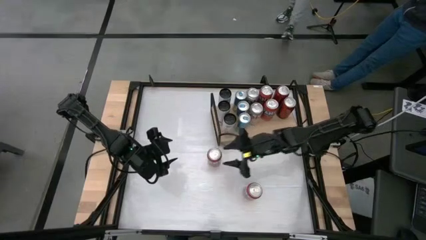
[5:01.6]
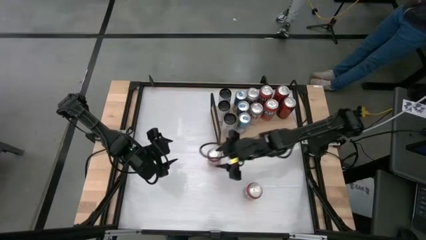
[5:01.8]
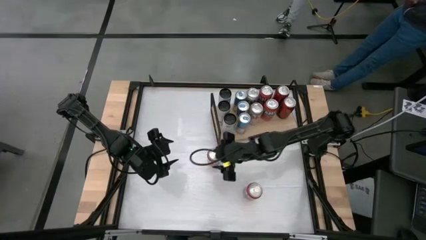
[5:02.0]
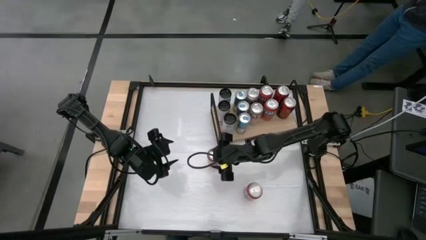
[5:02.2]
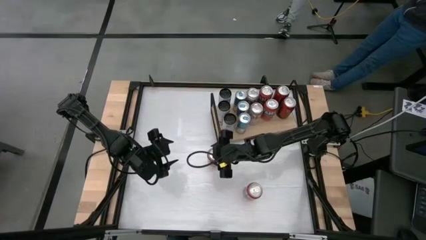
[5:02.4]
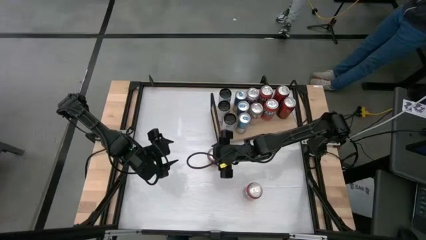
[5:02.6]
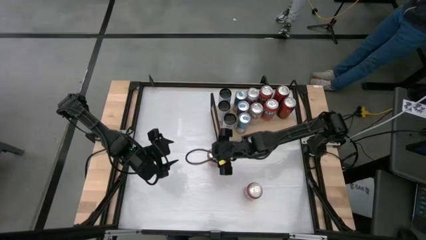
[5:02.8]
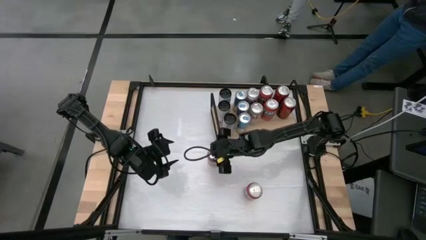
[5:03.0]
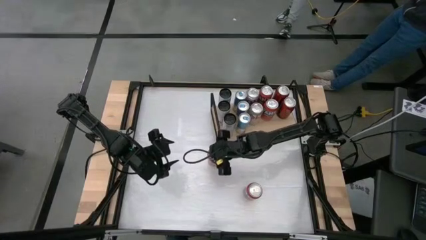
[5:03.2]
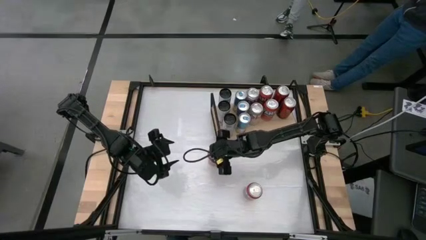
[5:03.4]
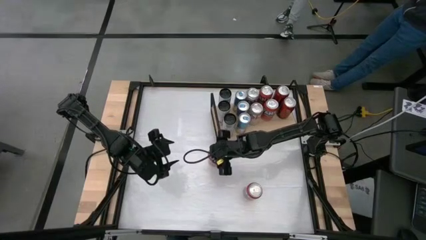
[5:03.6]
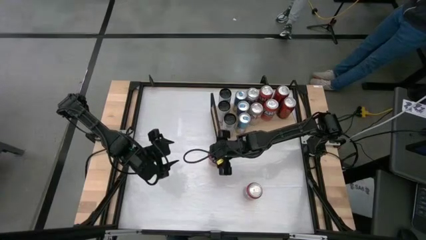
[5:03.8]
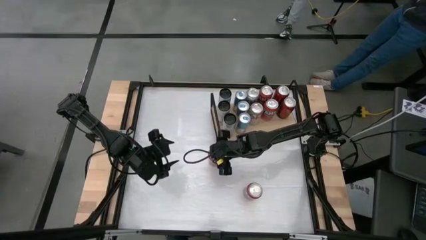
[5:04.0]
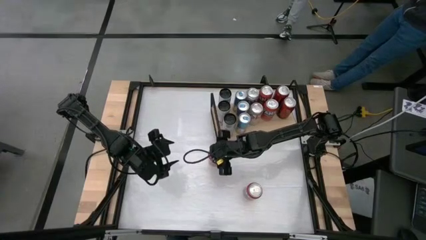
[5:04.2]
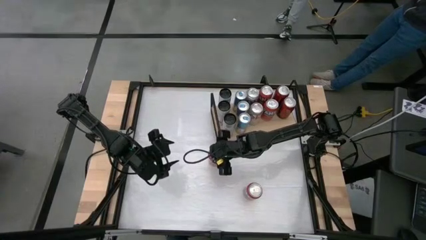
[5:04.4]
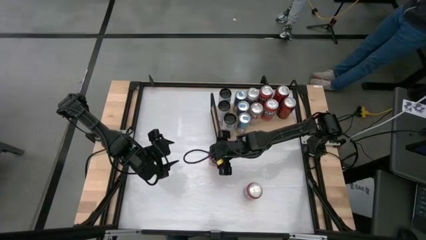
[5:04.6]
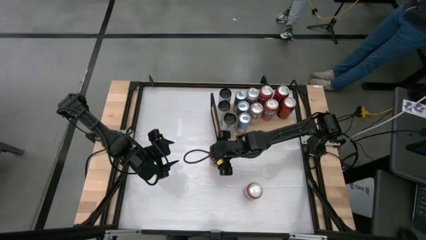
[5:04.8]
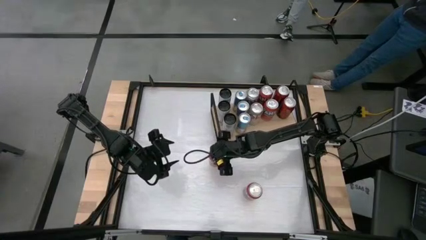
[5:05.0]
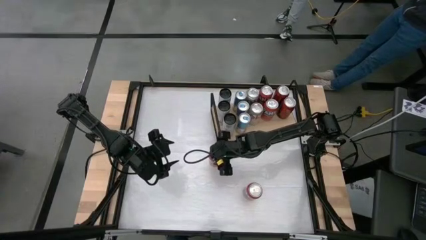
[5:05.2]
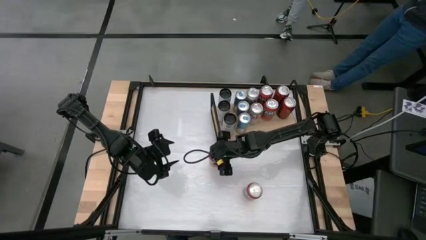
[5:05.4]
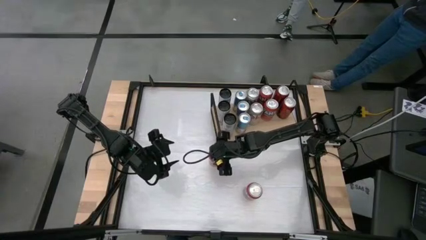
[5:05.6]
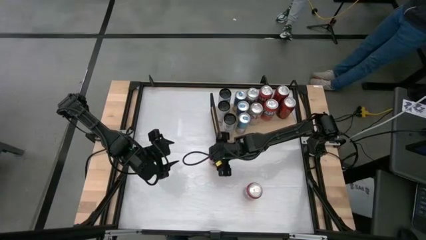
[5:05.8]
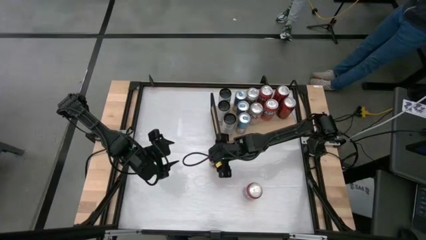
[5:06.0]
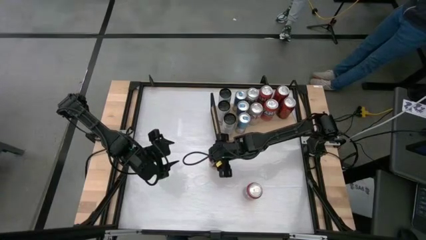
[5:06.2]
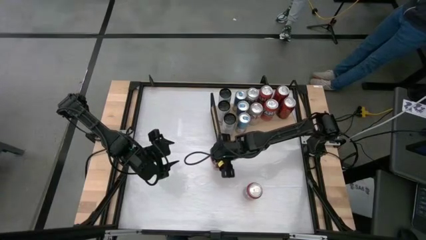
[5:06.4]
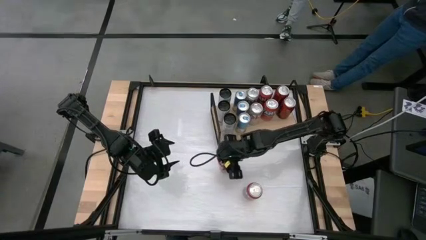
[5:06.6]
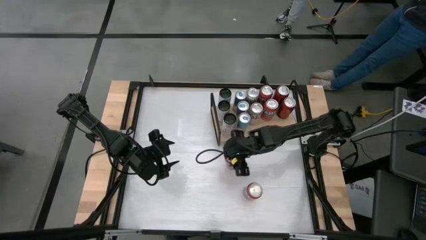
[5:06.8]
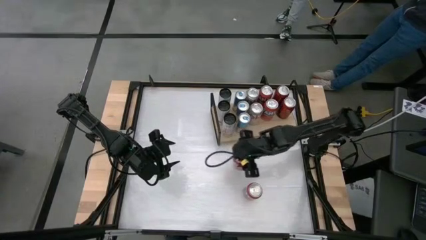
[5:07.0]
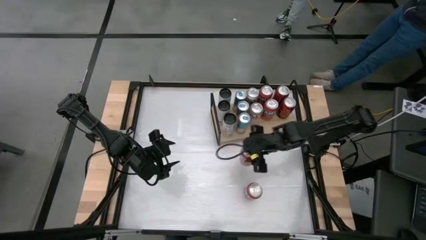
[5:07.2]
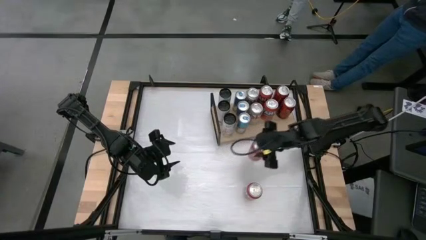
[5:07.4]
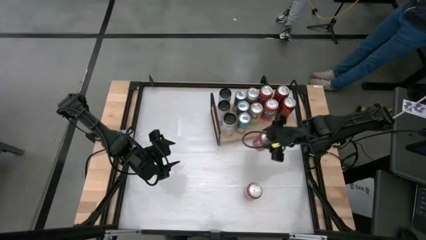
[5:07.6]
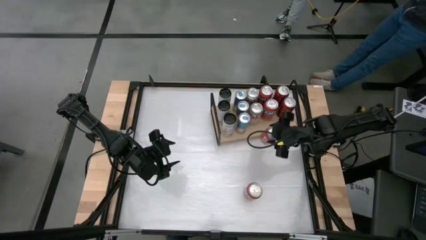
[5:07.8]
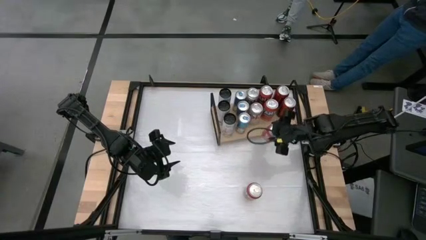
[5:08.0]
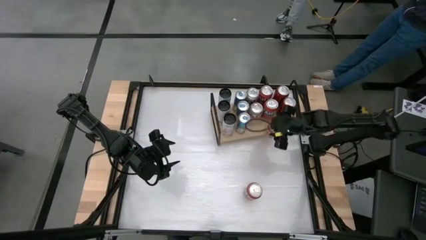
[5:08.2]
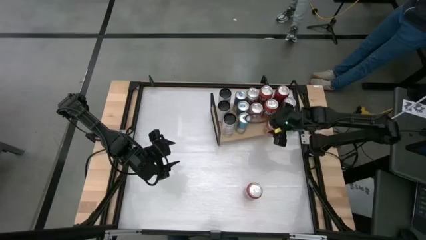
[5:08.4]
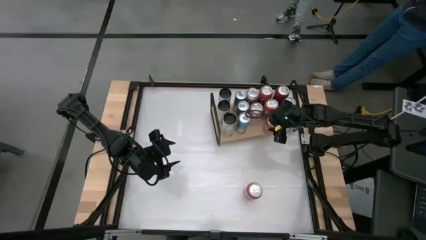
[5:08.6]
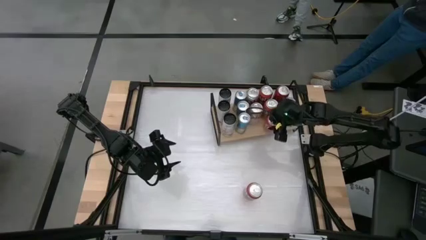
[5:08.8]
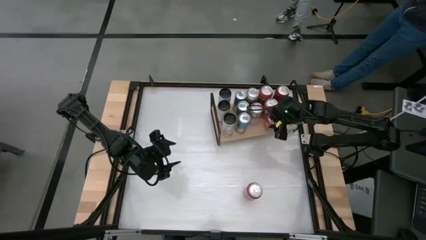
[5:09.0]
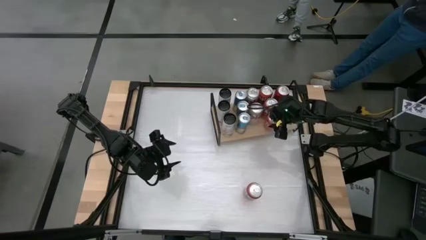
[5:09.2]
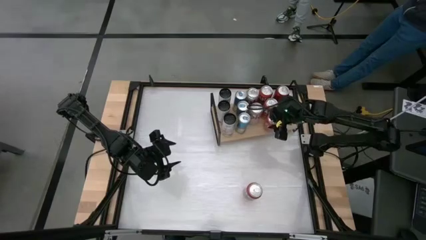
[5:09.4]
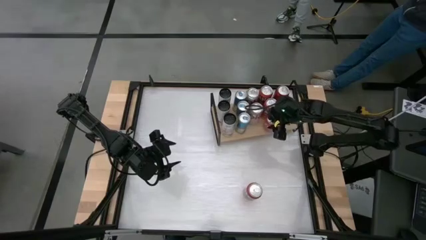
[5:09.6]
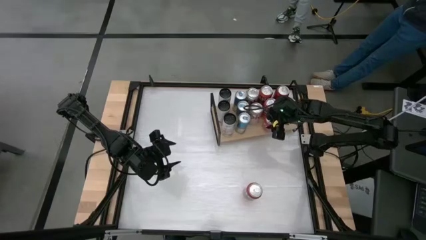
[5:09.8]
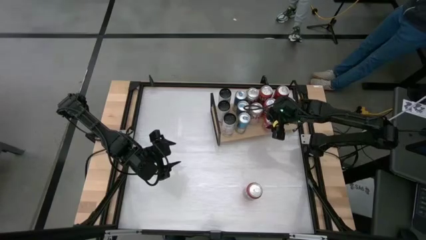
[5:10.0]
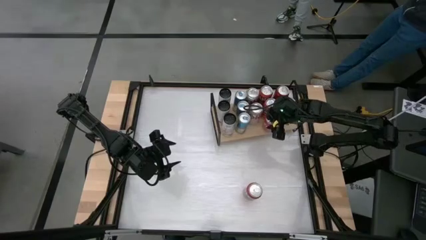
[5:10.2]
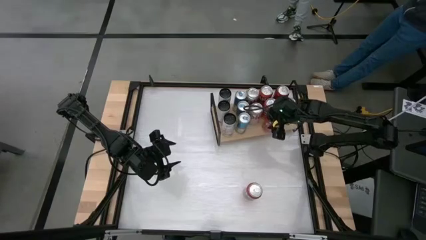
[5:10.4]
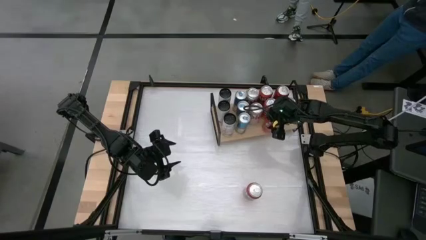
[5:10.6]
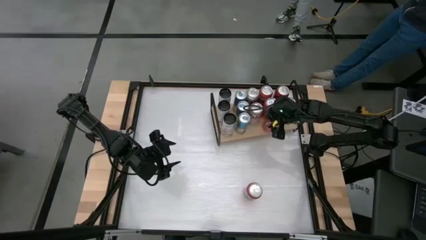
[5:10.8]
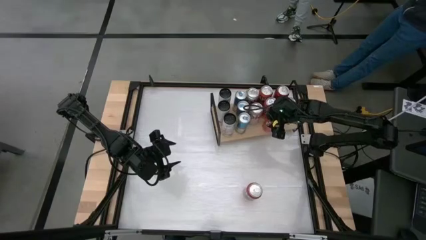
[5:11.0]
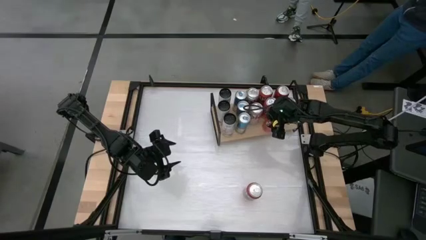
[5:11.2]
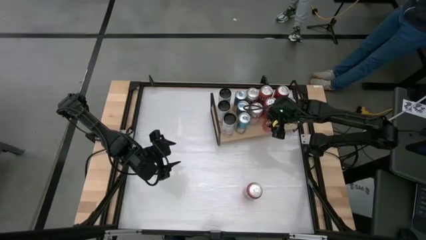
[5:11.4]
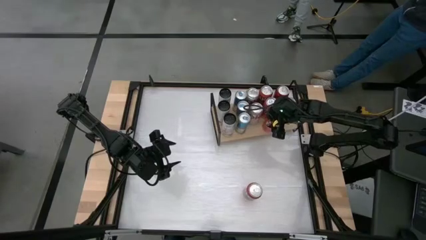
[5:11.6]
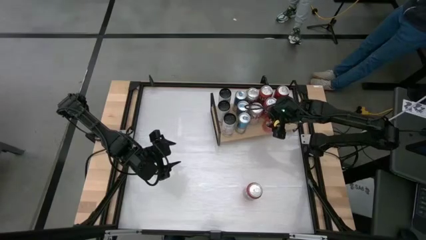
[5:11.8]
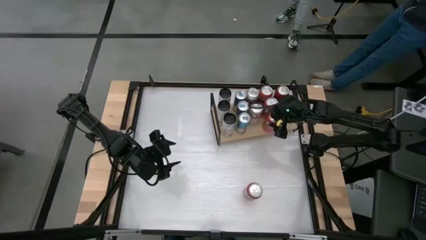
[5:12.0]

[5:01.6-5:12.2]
Task: Place canned beverage on shelf
Put the orange soda can on the shelf aligned with the other orange soda can

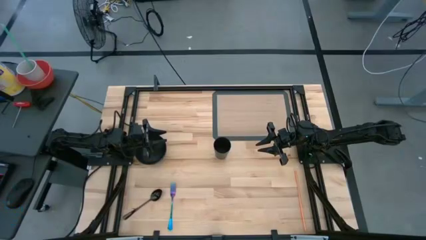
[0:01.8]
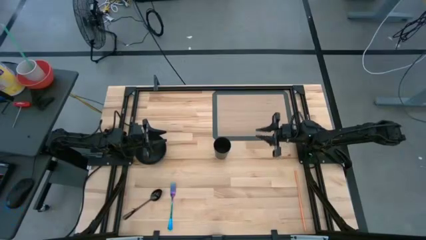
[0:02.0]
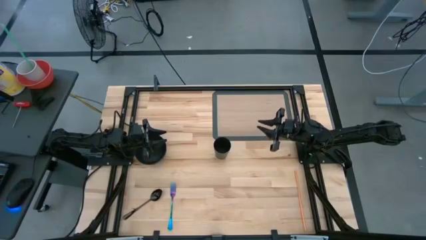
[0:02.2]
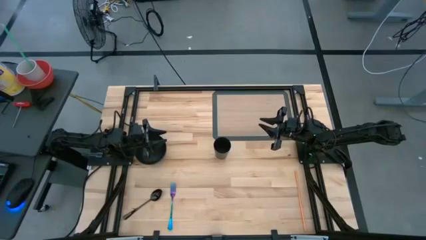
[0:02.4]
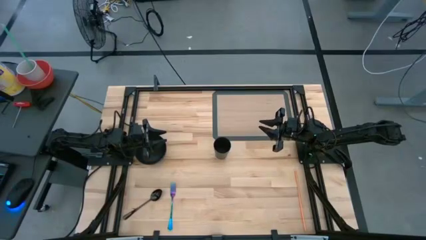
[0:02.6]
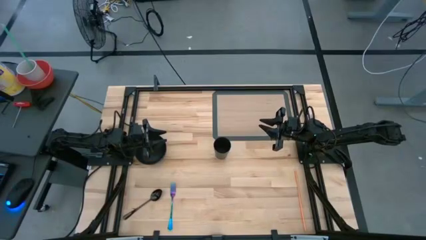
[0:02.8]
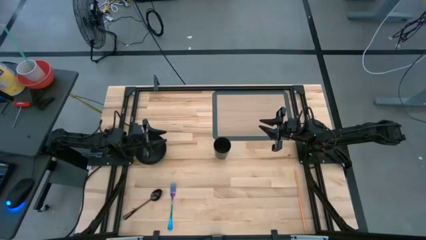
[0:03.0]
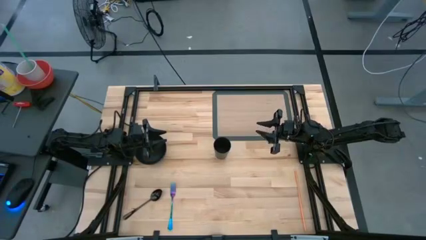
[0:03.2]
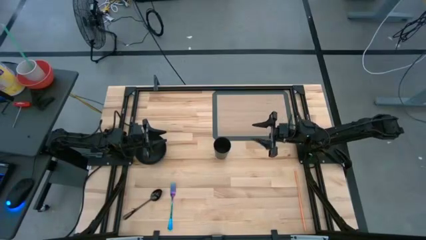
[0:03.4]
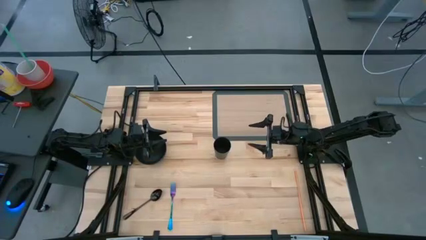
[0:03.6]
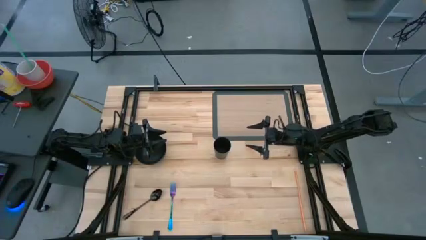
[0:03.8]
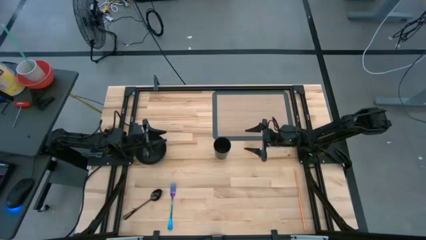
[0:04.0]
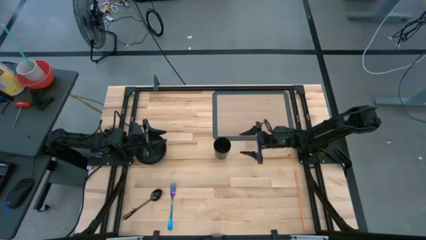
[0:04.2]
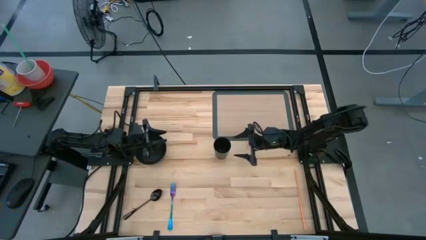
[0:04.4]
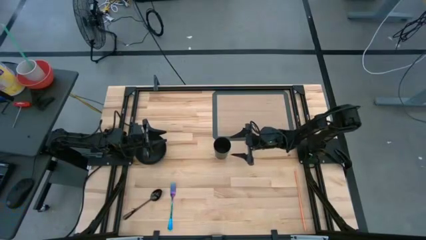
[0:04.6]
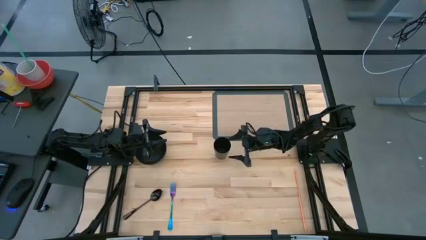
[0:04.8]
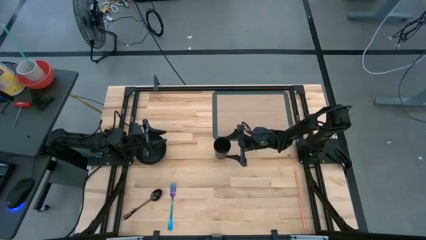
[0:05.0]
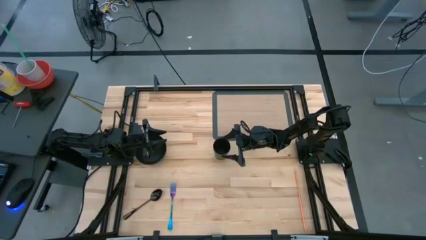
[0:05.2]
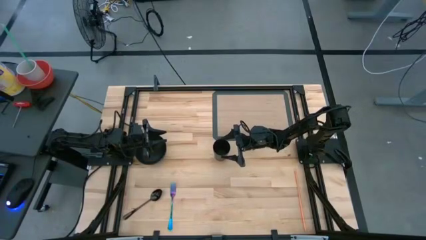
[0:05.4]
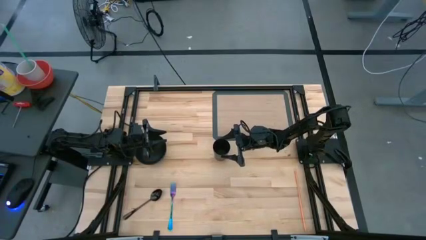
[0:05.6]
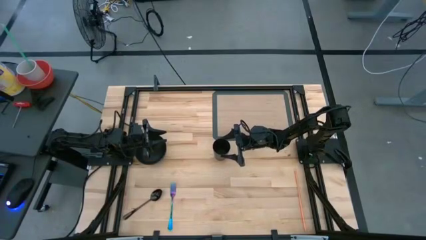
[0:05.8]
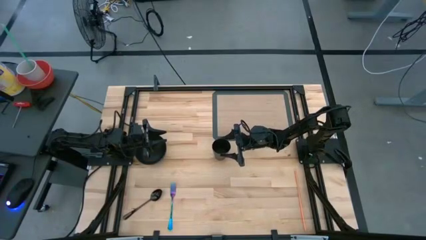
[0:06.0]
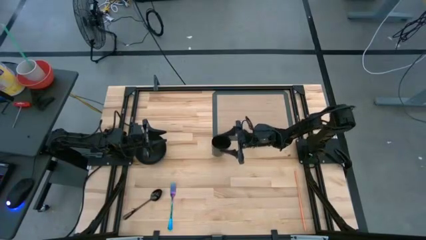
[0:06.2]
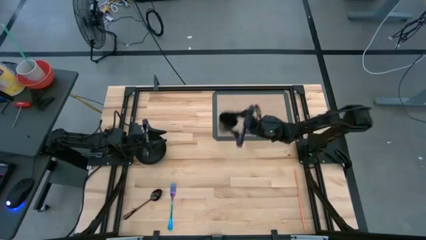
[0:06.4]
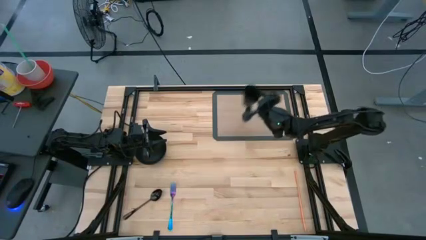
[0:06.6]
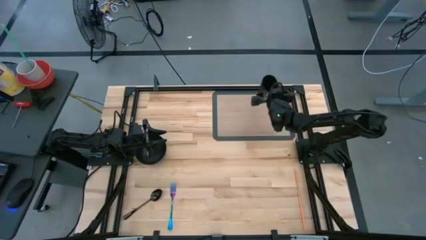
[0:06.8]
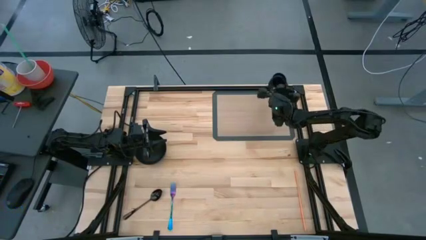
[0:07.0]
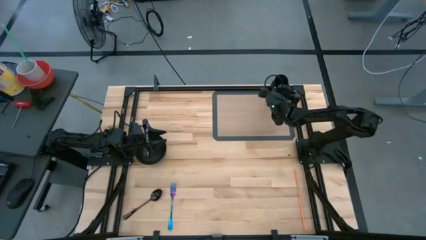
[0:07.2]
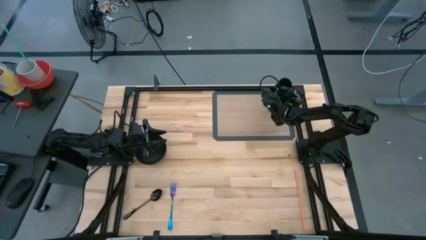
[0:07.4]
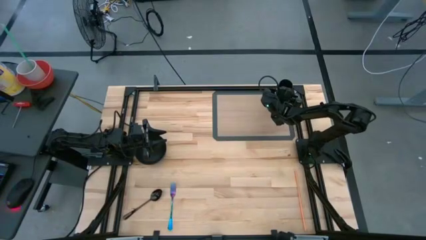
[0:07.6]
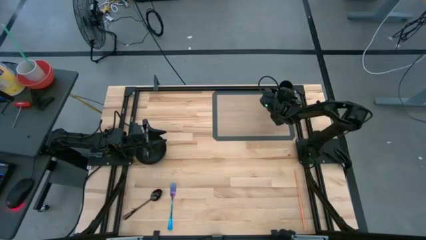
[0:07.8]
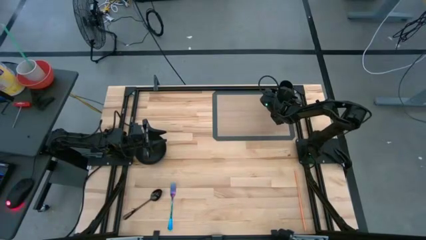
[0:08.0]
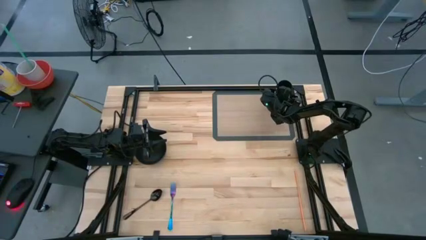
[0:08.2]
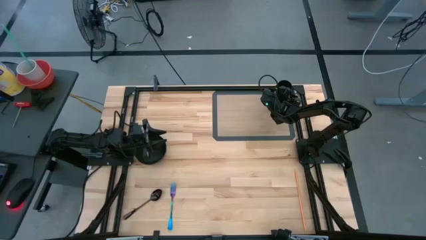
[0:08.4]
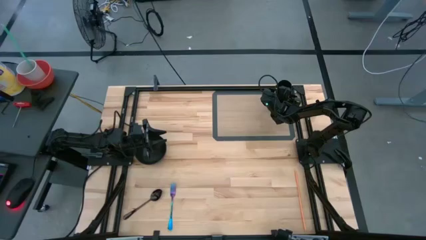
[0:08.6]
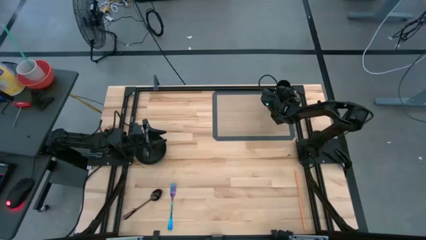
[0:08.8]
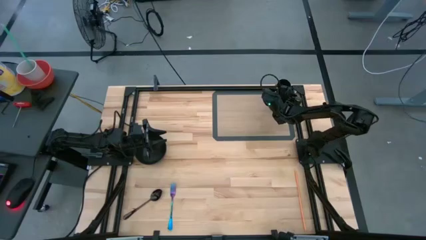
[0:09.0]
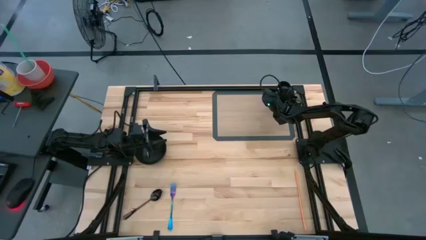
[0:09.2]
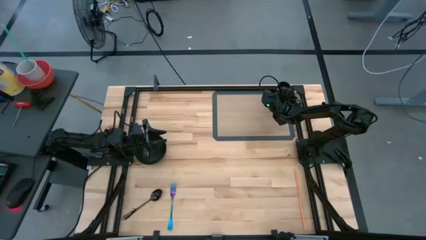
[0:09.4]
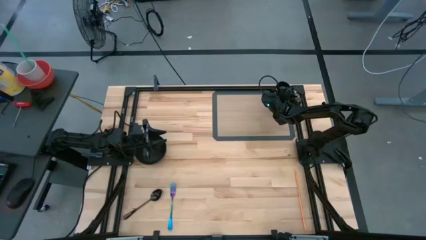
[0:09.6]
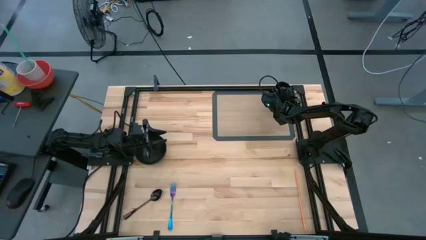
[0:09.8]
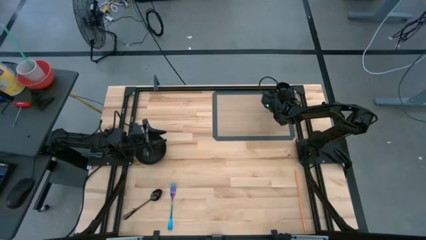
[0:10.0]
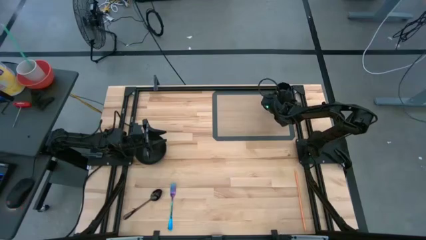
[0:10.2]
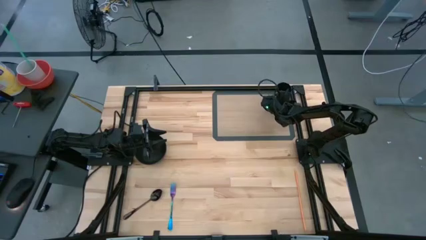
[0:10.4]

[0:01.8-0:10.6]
Task: Pick & Place Utensil
Put the black cup on the transparent mat
